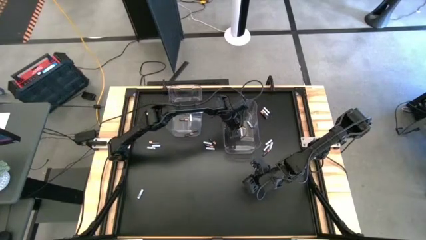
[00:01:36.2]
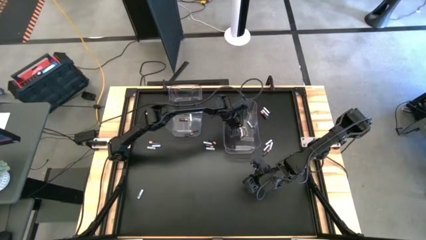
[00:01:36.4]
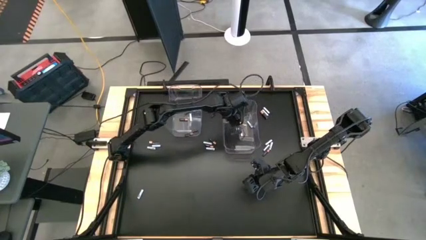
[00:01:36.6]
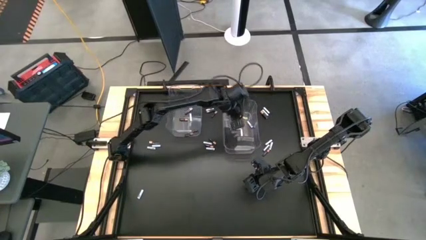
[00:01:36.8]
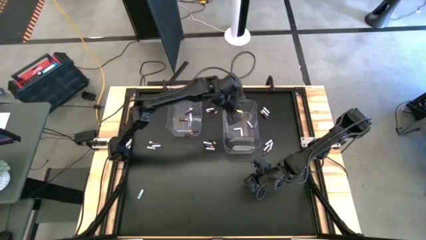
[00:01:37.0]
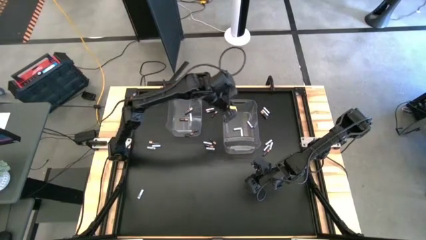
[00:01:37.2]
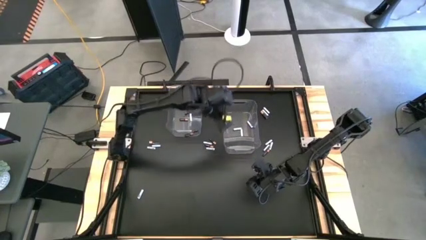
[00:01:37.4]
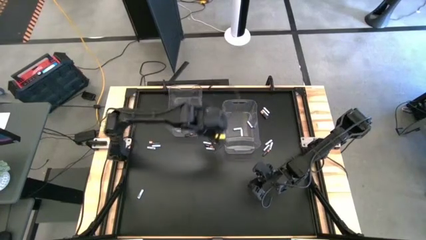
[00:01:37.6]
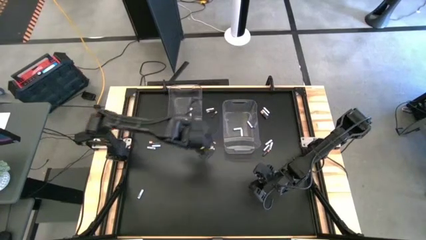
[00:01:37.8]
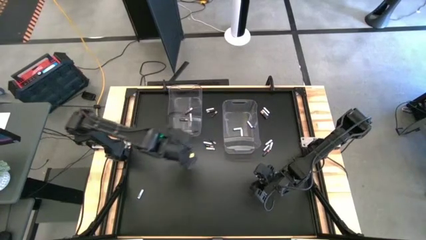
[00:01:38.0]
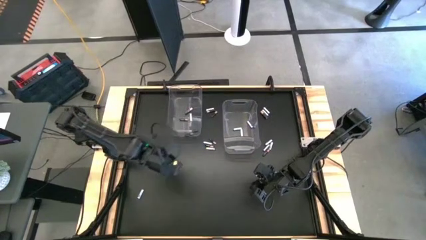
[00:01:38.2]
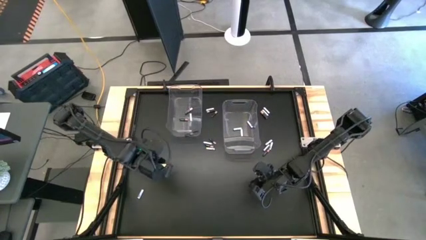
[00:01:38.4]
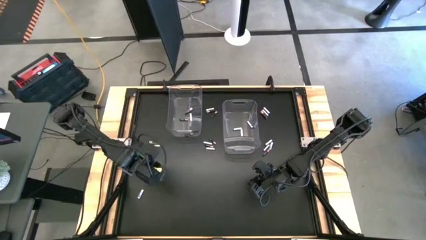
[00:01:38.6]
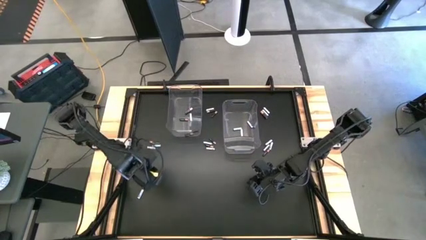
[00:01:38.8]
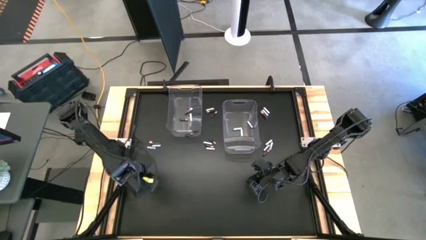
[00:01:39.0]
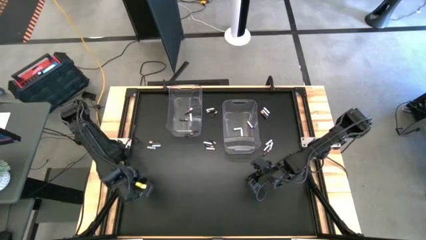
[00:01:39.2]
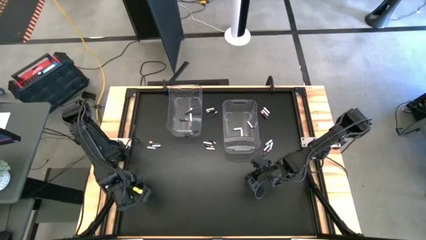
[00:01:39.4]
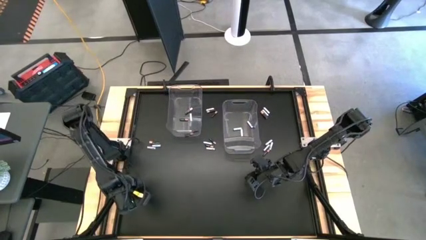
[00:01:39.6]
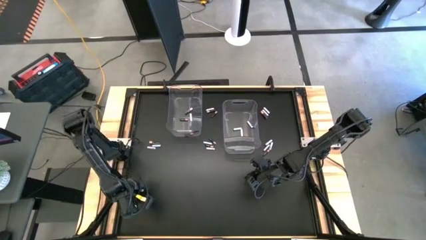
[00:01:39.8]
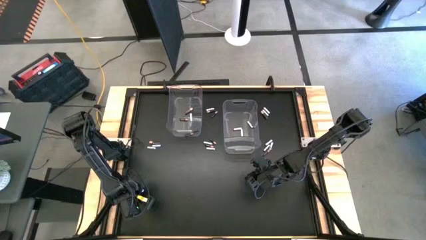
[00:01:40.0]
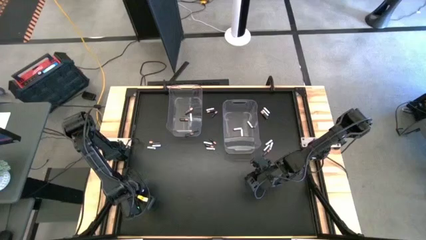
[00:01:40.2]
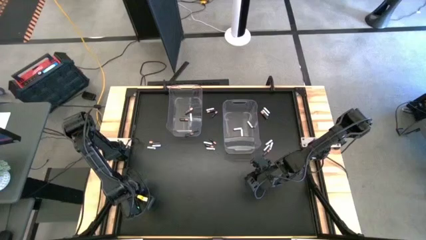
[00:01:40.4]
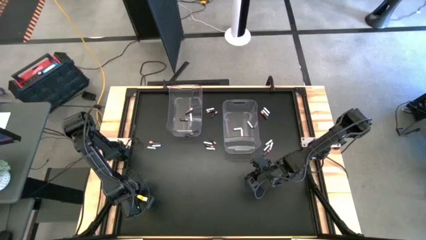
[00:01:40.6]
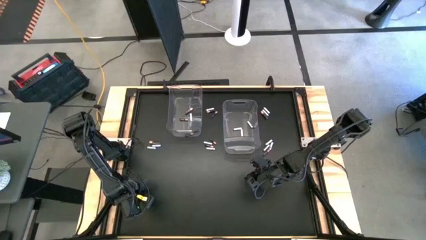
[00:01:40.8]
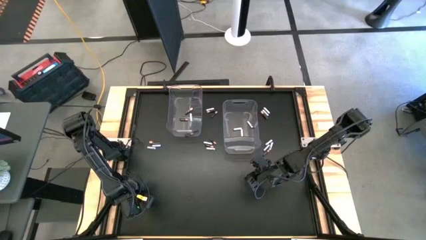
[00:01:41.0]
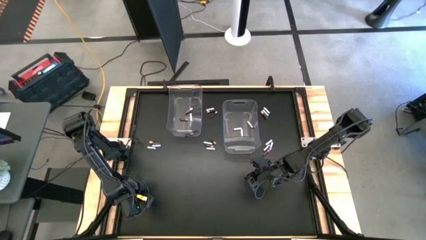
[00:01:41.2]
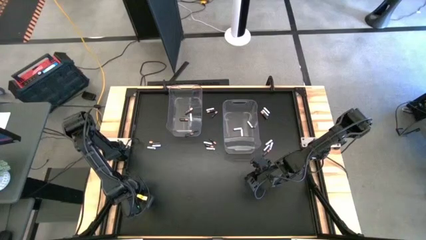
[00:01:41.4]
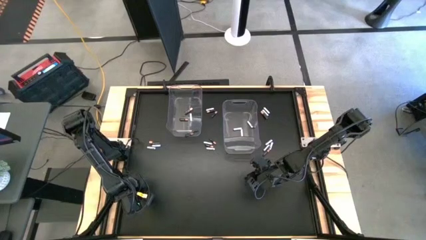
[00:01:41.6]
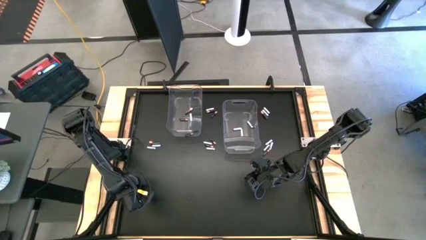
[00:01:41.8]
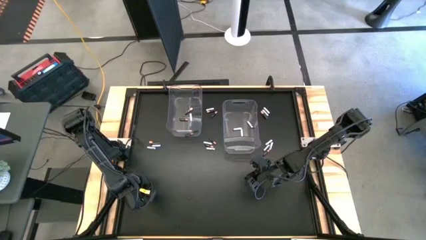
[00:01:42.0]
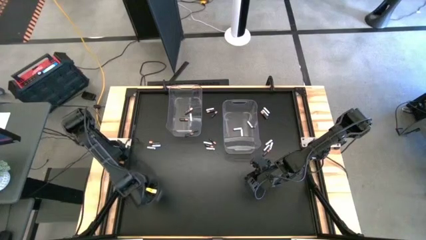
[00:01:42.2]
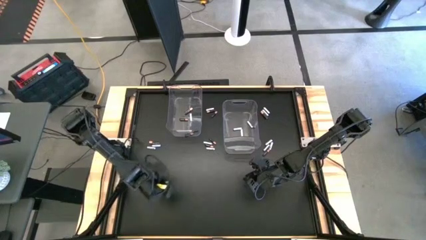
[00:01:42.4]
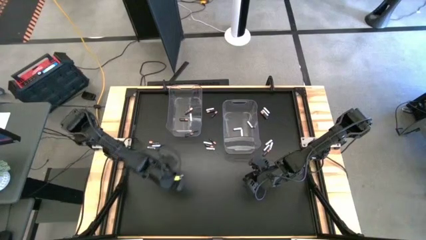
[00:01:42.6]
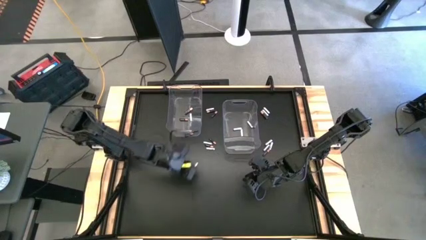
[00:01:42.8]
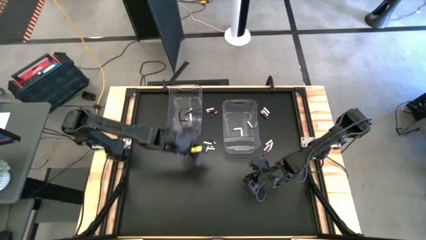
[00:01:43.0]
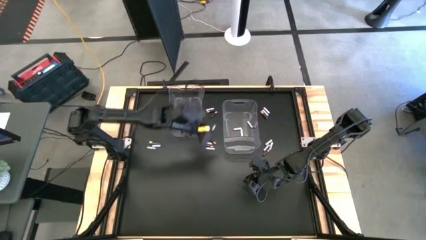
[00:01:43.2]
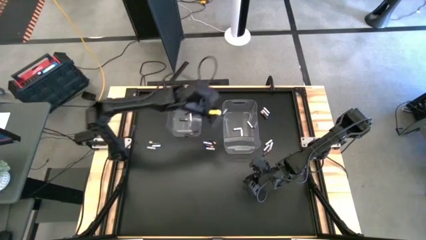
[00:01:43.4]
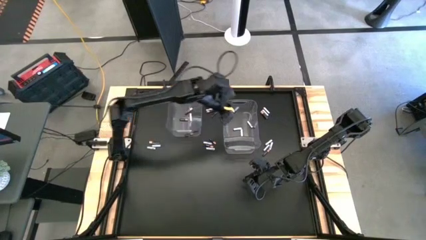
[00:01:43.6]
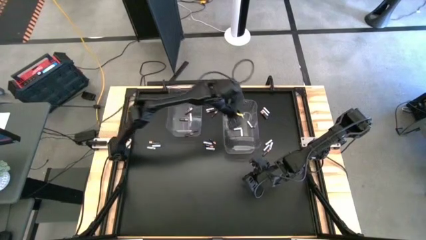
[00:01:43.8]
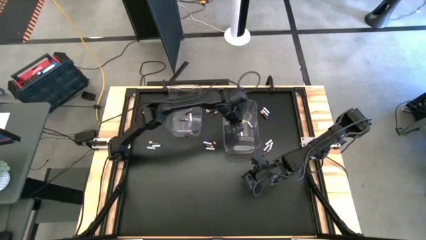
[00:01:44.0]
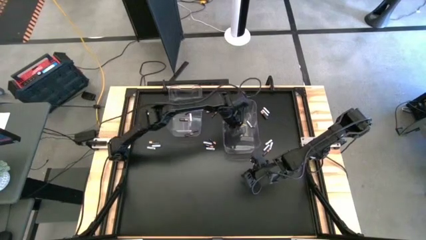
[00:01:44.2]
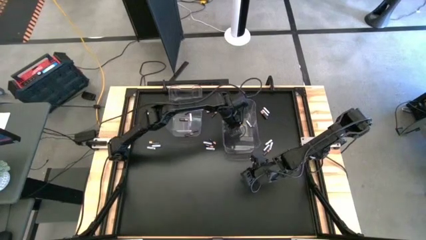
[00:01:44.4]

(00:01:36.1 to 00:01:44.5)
Task: Sort batteries
Put the white battery into the right transparent bin

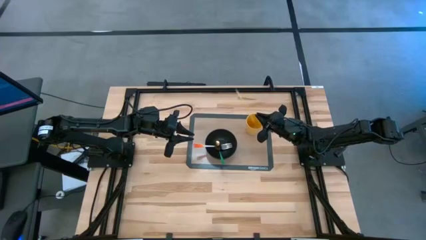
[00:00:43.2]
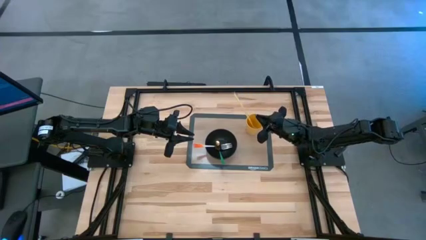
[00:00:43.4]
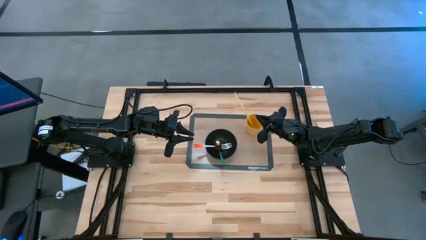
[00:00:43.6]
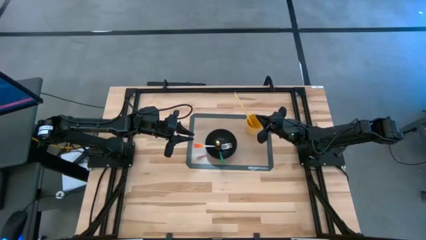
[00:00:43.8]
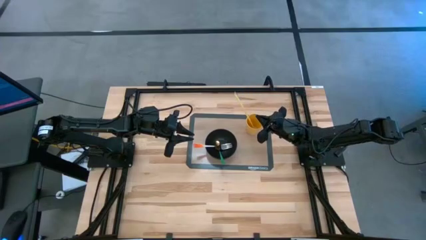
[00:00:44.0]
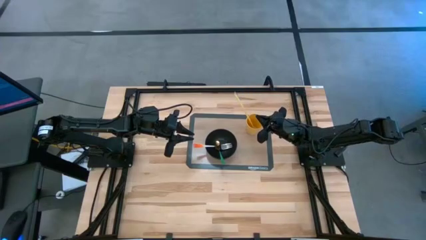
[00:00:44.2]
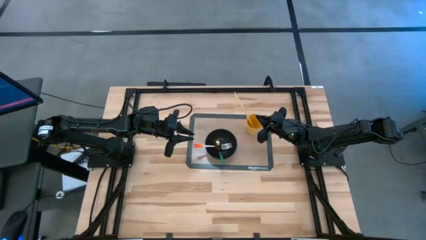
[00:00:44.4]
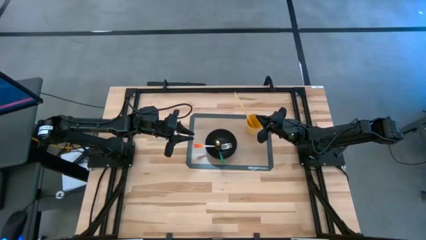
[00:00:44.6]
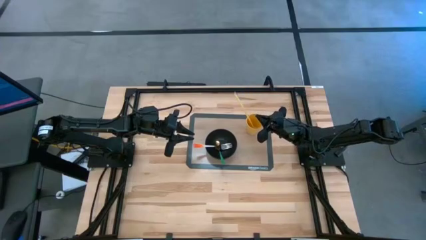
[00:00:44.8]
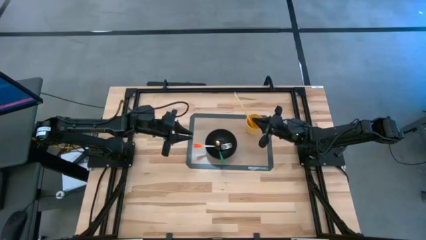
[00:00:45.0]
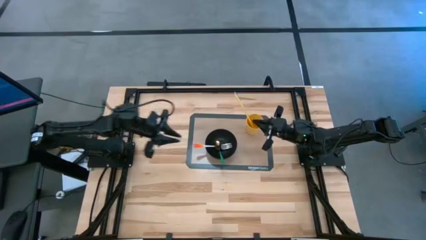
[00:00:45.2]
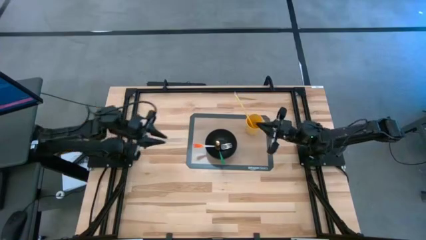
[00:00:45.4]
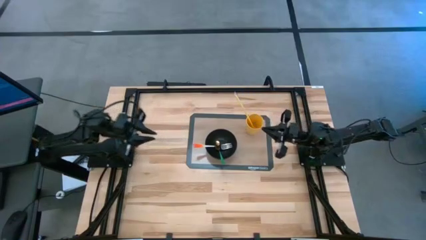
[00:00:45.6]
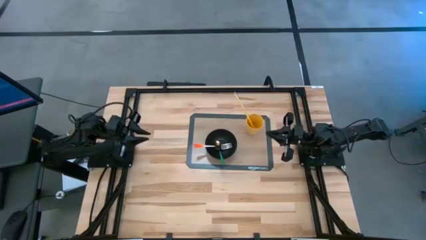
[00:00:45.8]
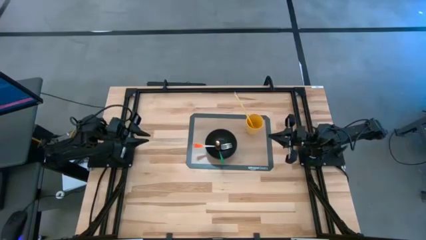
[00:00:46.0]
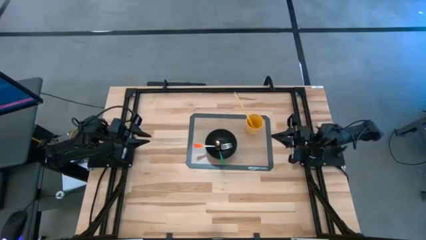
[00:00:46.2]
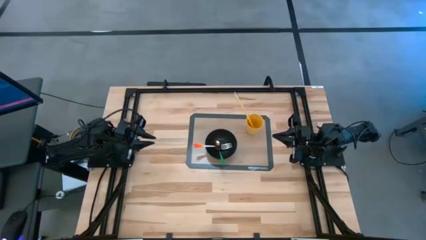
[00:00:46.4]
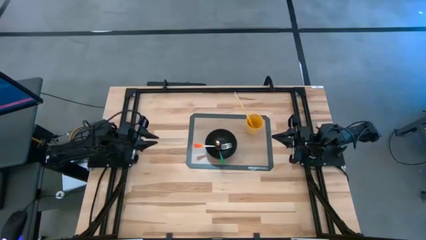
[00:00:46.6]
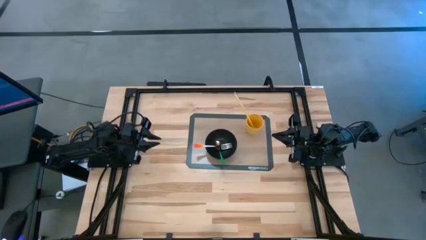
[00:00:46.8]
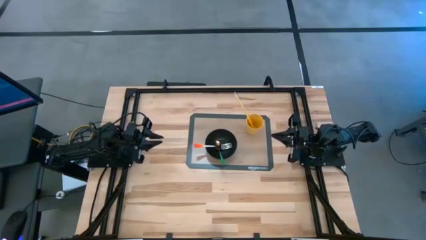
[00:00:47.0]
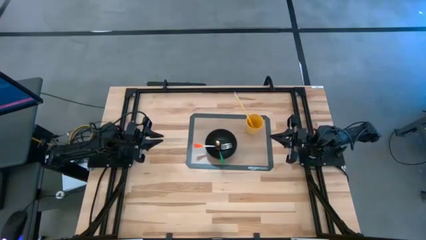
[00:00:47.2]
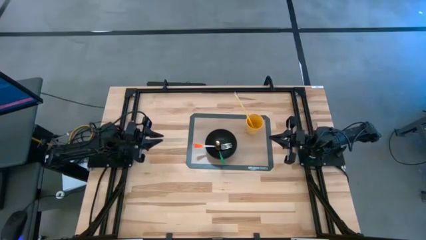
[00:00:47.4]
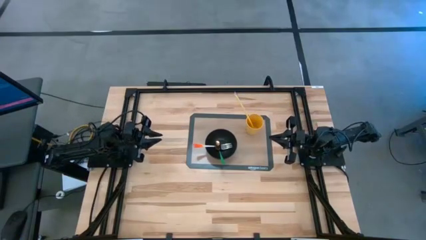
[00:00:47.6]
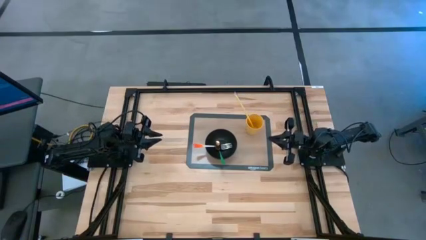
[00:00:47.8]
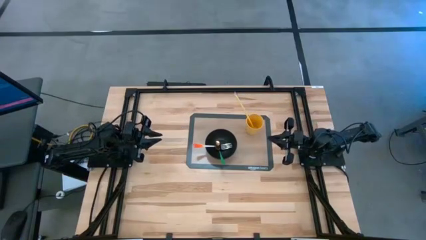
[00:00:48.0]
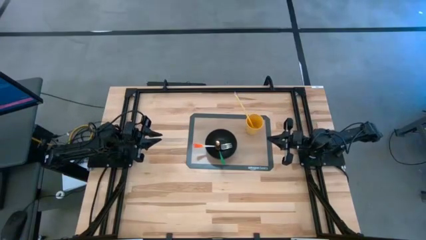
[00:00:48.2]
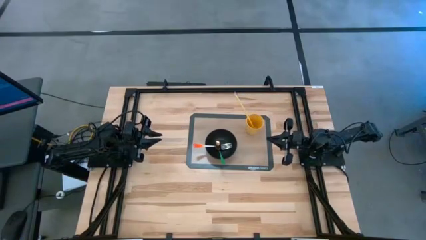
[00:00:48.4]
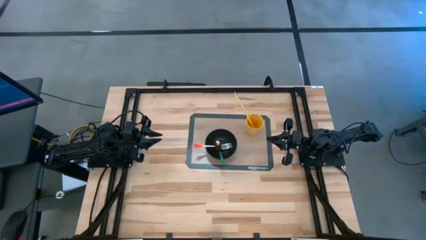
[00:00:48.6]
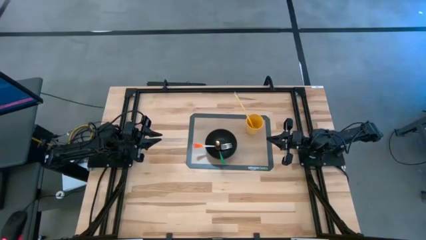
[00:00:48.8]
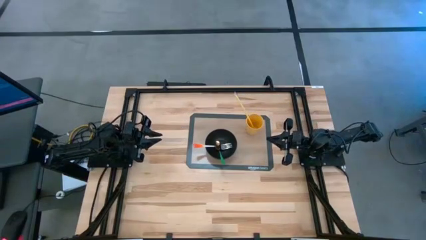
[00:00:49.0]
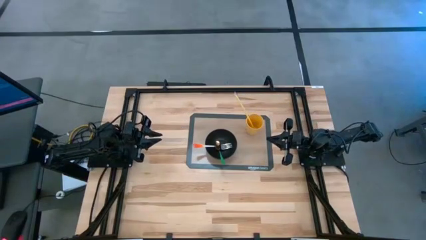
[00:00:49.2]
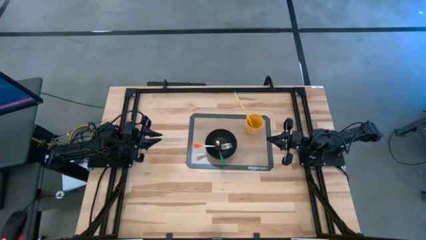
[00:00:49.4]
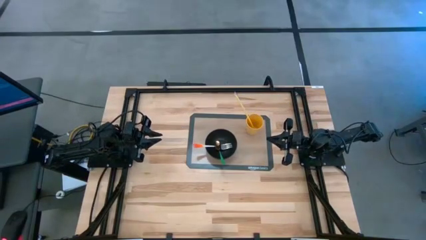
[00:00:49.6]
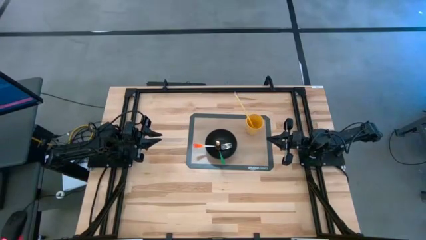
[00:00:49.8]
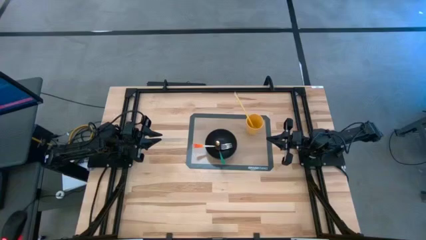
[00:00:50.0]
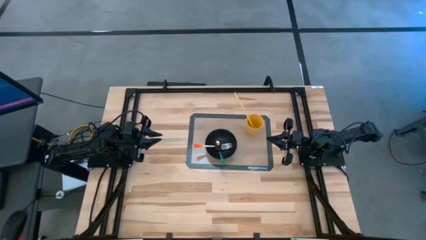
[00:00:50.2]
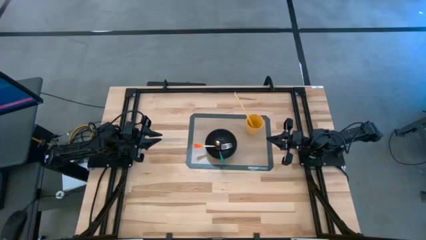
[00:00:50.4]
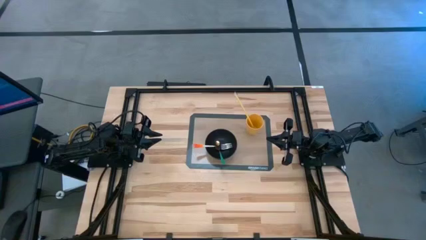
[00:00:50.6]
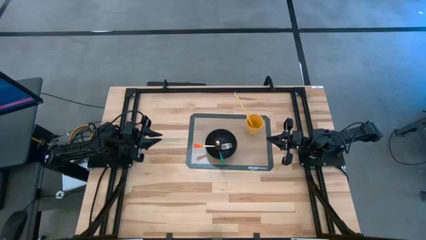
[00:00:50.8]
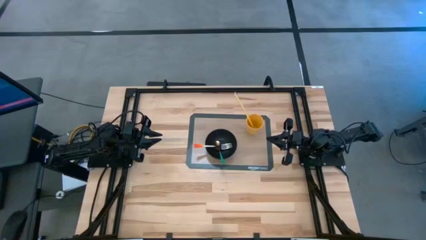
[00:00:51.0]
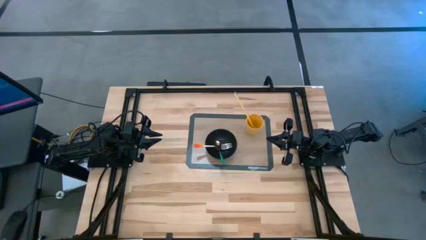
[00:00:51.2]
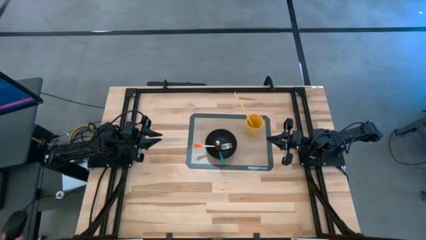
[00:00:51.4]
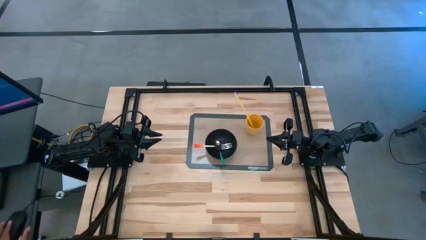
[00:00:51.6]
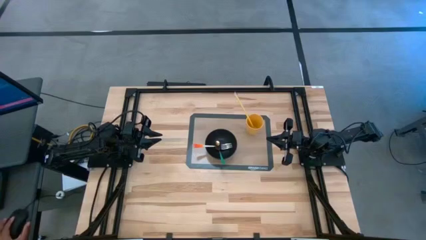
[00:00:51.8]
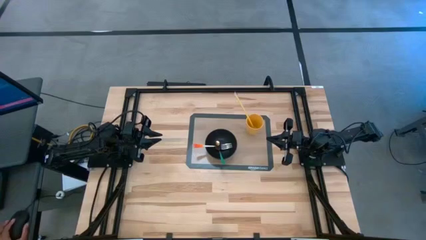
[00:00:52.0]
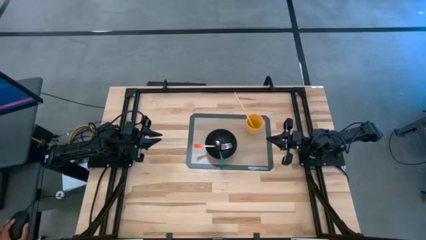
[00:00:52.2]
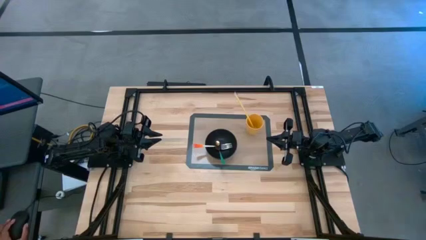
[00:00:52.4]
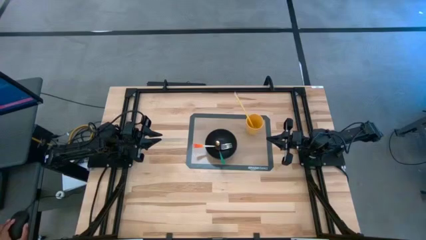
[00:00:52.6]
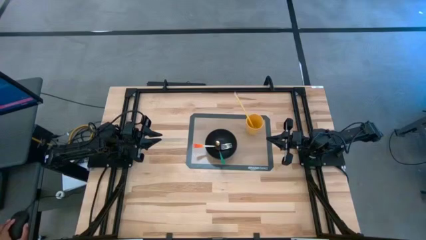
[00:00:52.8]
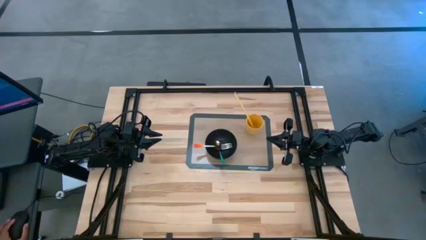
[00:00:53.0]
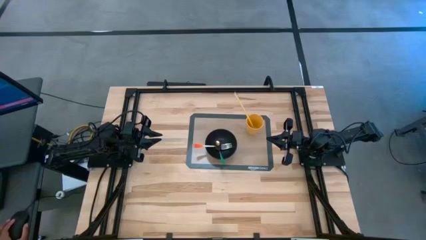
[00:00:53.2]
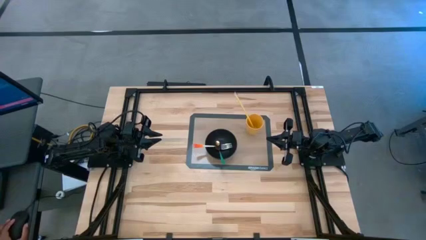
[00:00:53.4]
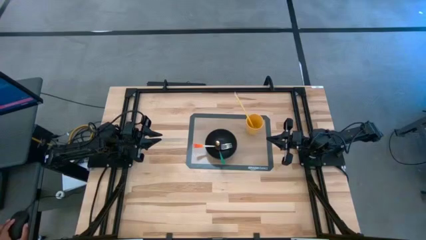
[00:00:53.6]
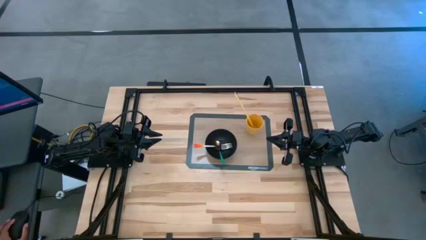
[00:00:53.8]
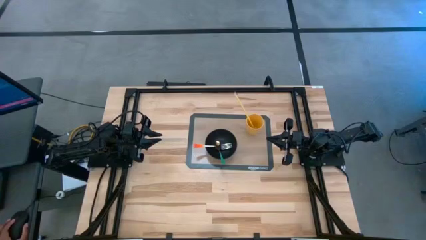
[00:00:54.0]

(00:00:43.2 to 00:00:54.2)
Task: Pick & Place Utensil
Return to Home Position
